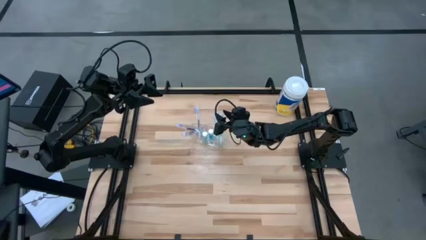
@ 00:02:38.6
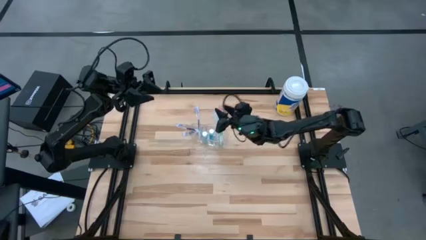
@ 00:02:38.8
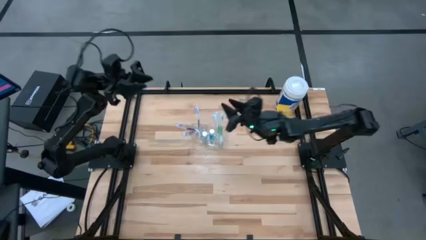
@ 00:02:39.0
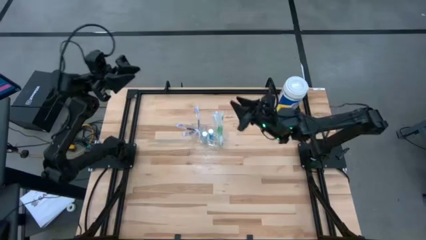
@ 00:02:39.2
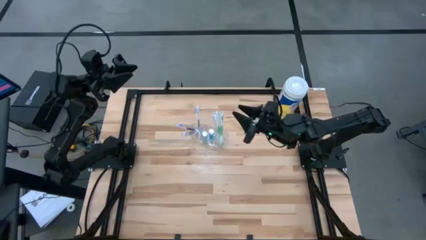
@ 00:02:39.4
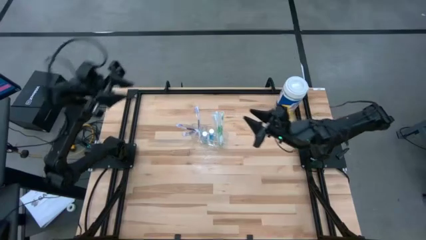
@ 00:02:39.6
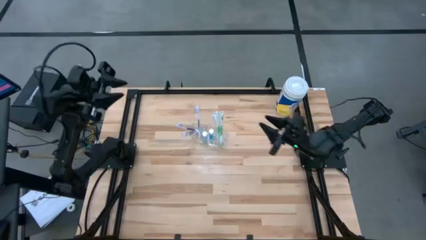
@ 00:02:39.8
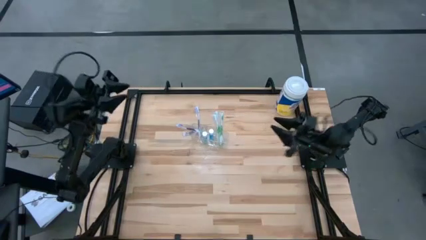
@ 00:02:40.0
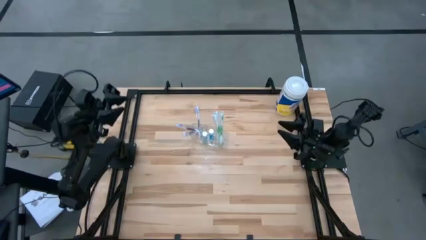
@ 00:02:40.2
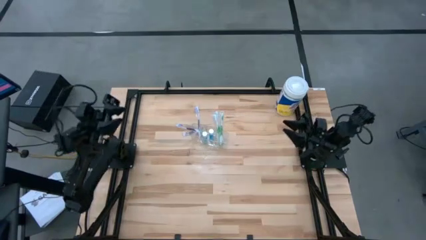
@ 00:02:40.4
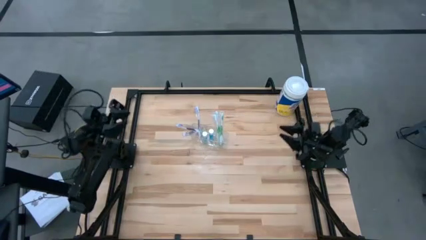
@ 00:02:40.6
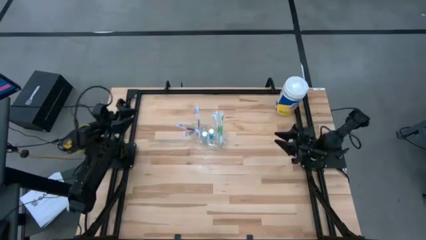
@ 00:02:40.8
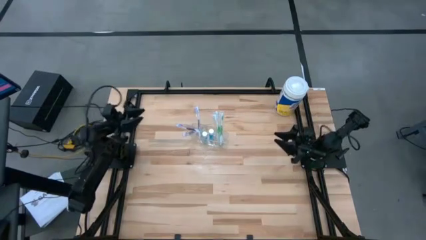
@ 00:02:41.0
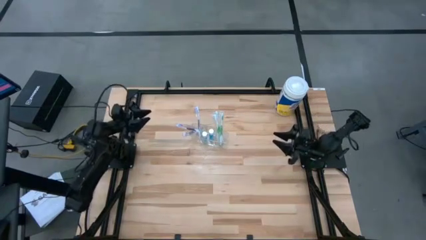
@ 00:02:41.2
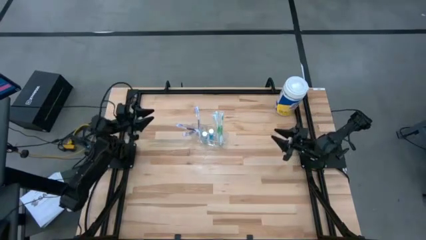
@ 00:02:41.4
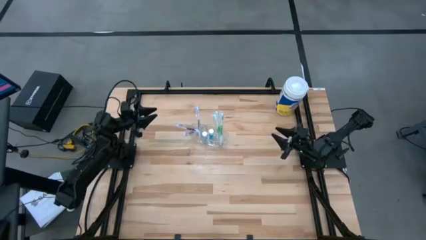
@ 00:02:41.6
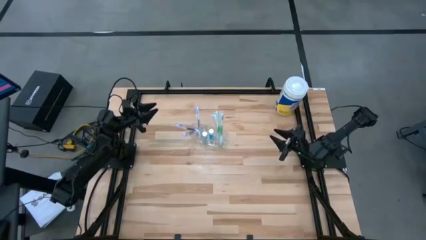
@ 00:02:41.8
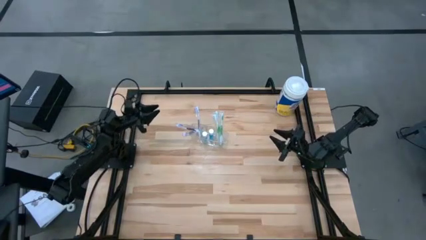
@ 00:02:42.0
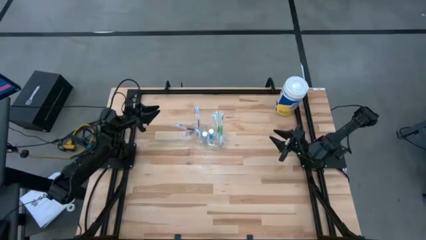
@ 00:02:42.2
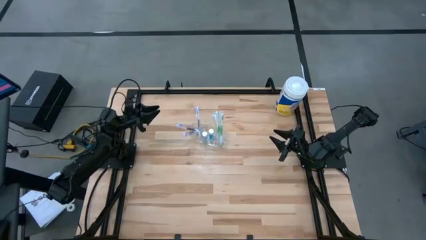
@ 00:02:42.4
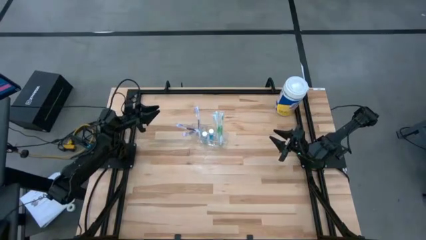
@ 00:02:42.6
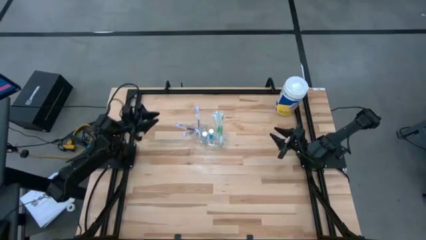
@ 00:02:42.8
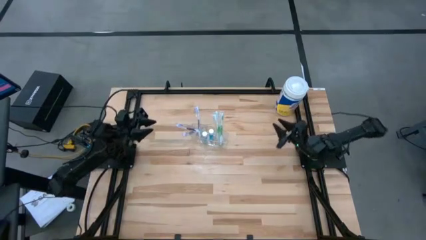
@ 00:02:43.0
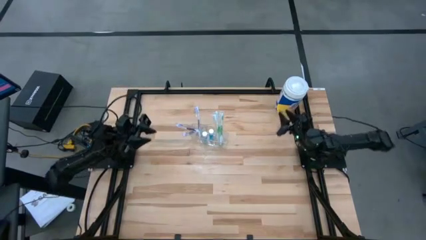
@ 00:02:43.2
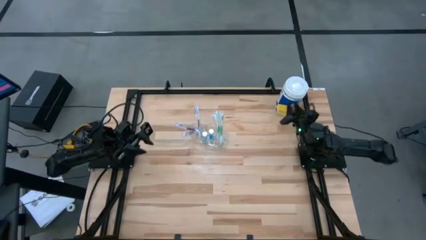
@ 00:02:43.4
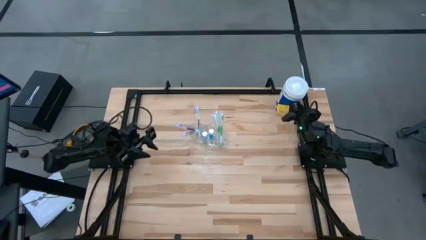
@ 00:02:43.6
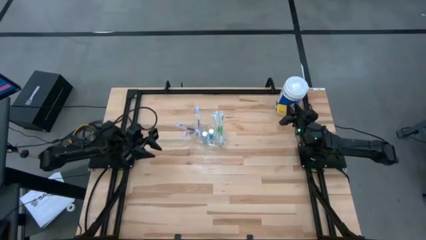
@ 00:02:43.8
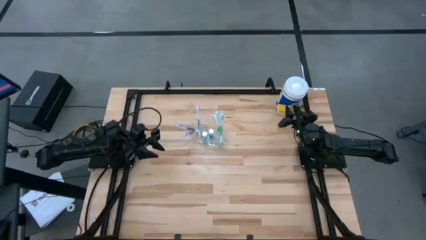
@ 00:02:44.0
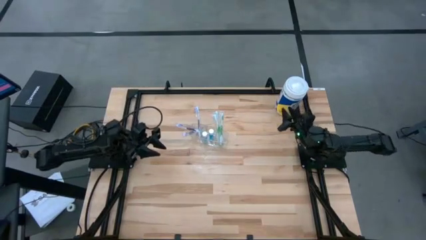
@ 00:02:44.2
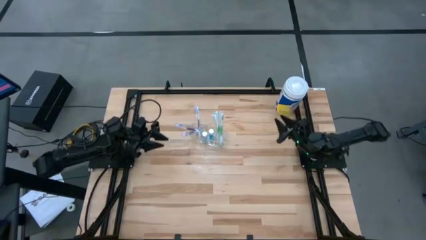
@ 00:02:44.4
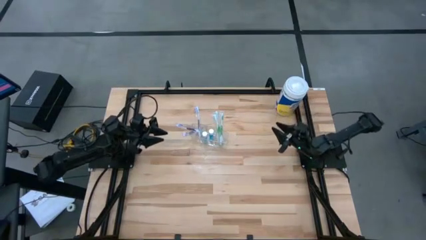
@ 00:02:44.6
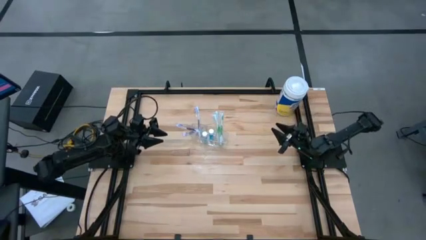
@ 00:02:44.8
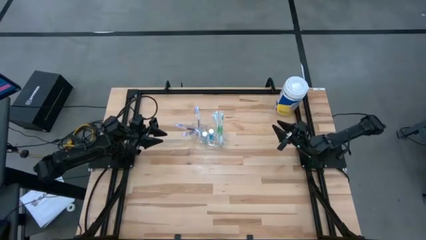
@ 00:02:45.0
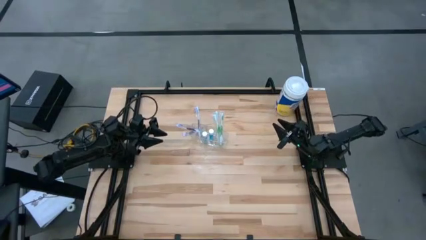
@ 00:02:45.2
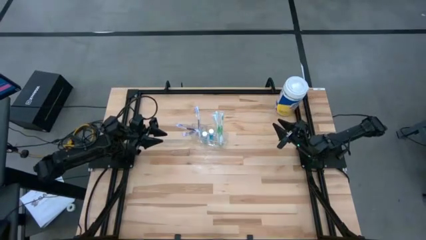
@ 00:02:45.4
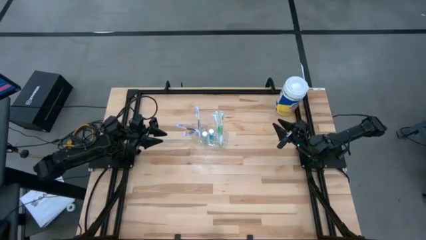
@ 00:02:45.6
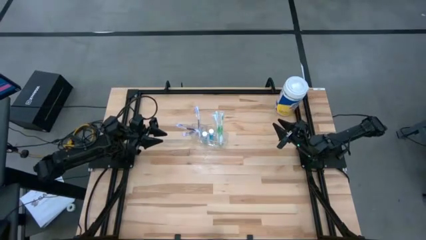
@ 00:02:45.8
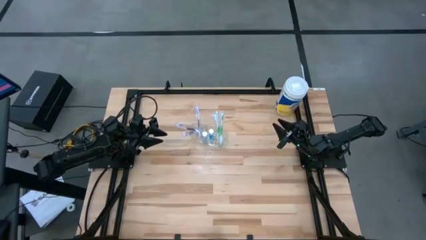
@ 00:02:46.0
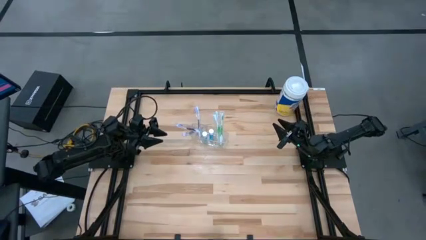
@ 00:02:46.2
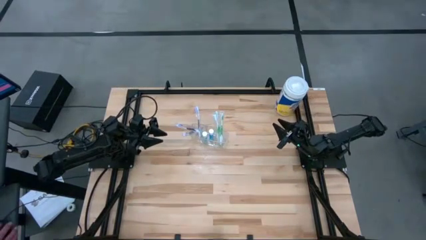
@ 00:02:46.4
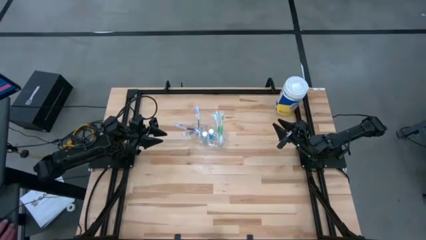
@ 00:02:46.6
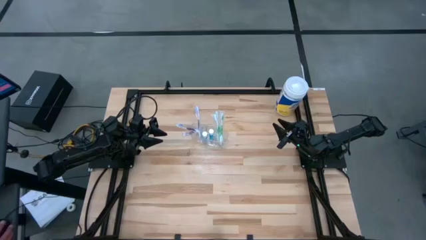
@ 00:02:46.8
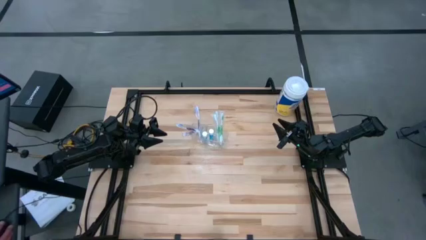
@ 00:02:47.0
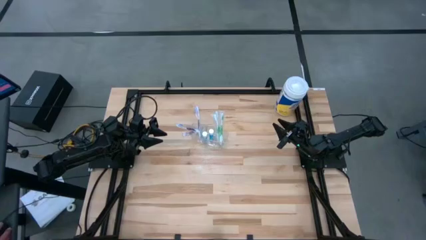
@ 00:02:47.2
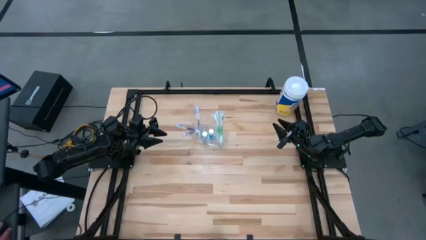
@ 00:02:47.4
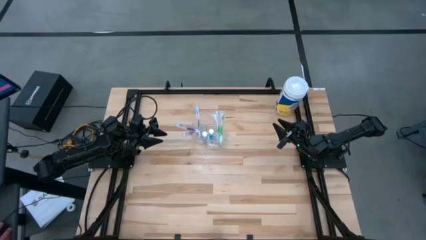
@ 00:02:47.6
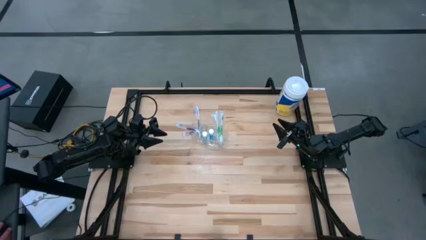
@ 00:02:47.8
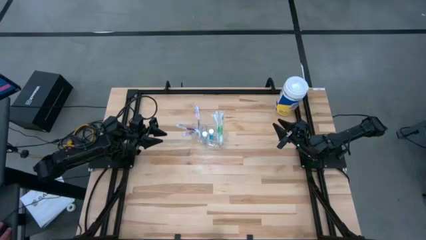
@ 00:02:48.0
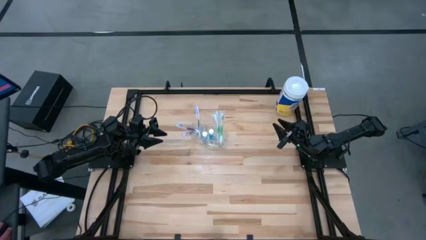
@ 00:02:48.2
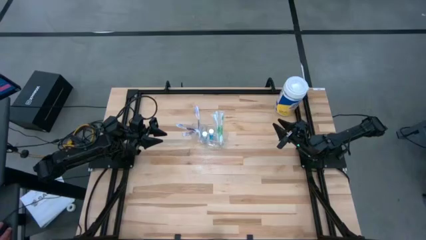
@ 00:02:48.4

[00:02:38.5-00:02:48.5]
Task: Pick & Place toothbrushing station
Return to Home Position

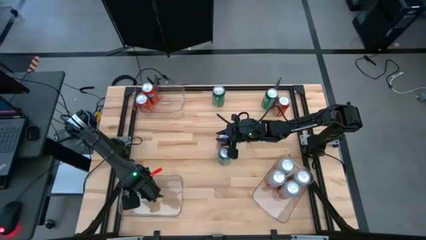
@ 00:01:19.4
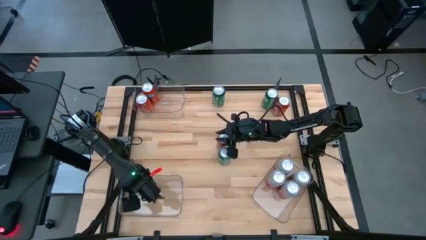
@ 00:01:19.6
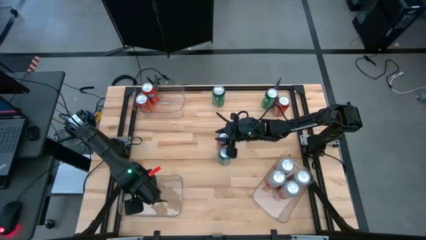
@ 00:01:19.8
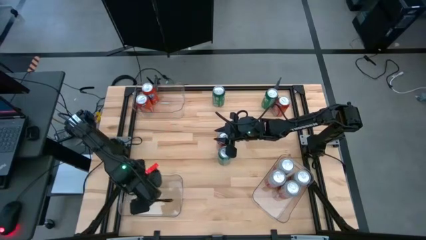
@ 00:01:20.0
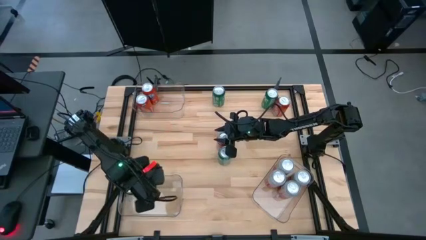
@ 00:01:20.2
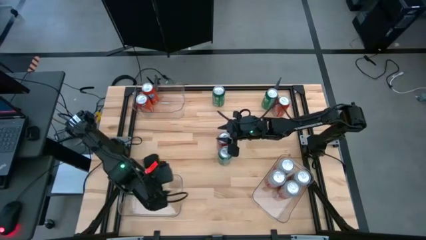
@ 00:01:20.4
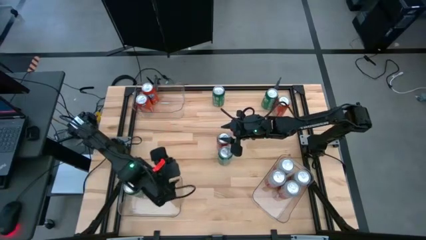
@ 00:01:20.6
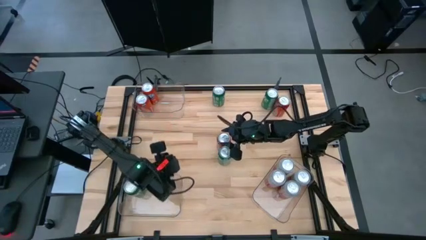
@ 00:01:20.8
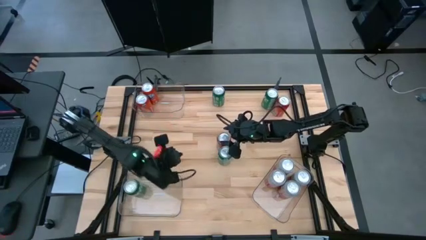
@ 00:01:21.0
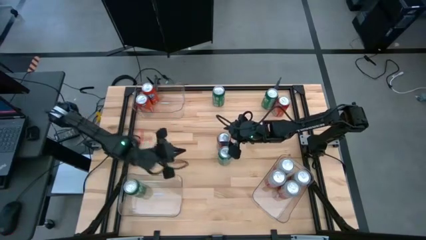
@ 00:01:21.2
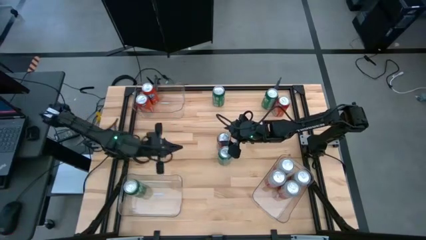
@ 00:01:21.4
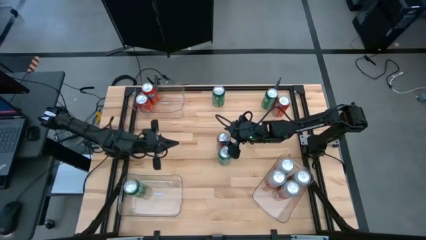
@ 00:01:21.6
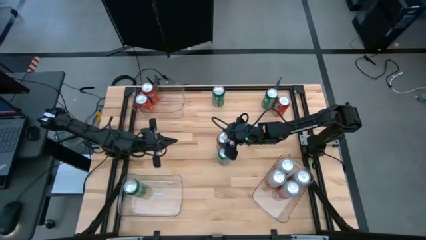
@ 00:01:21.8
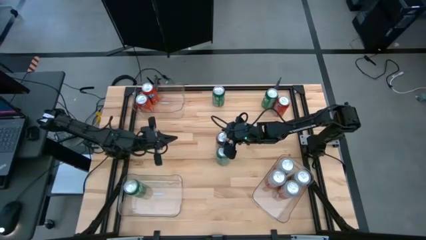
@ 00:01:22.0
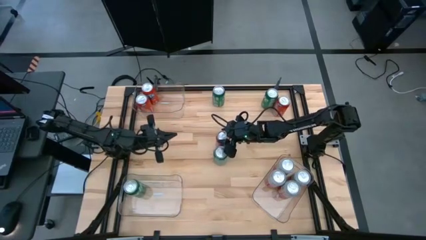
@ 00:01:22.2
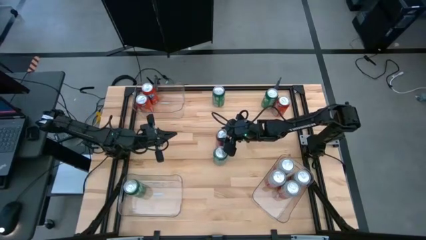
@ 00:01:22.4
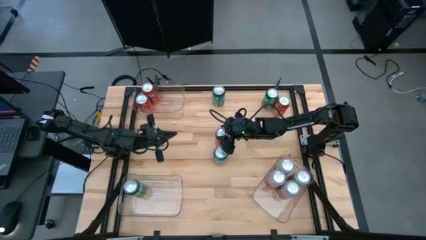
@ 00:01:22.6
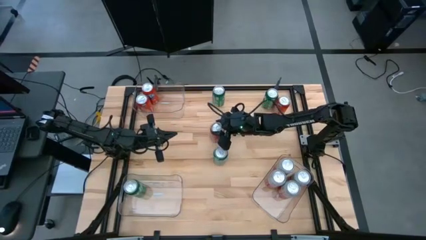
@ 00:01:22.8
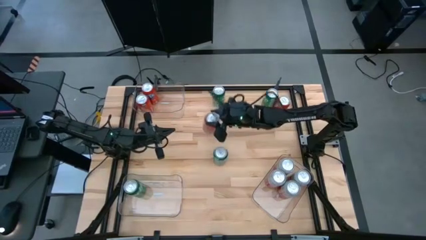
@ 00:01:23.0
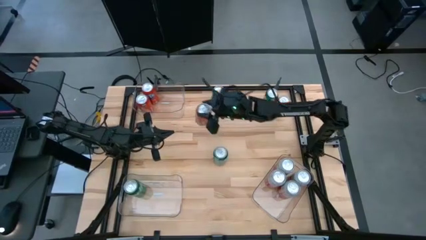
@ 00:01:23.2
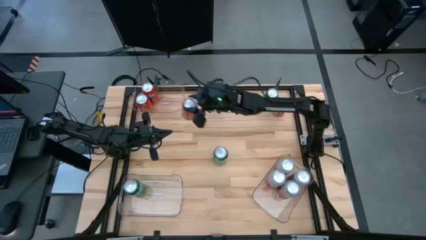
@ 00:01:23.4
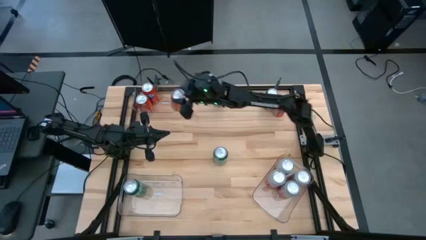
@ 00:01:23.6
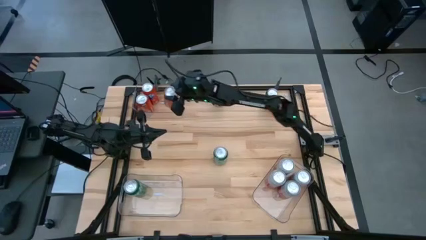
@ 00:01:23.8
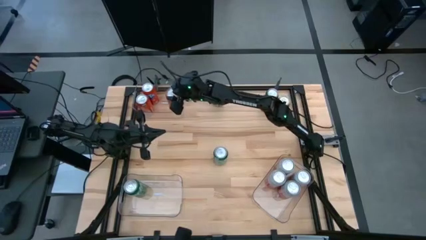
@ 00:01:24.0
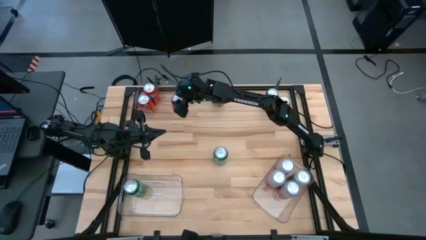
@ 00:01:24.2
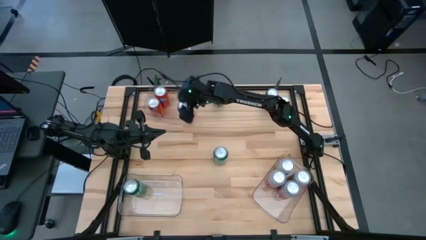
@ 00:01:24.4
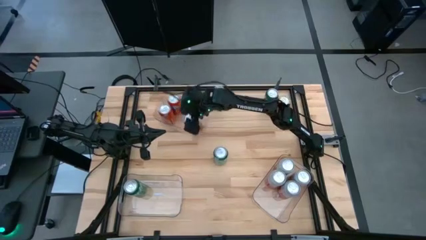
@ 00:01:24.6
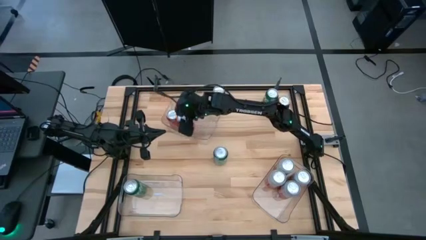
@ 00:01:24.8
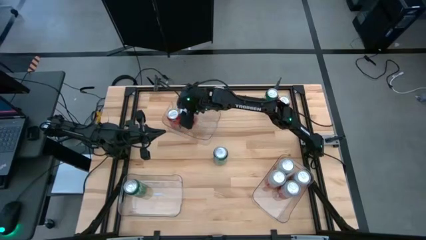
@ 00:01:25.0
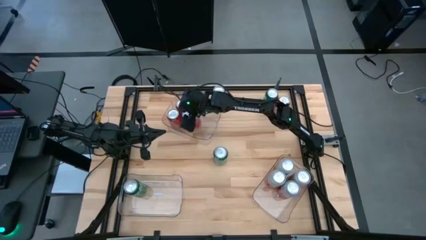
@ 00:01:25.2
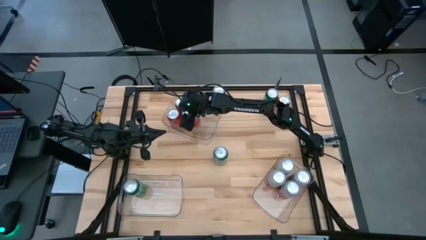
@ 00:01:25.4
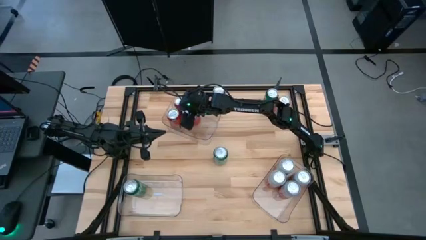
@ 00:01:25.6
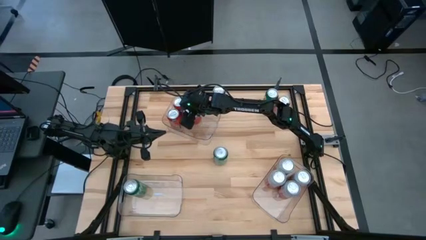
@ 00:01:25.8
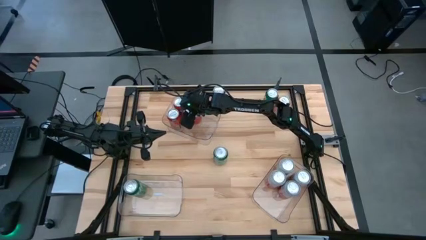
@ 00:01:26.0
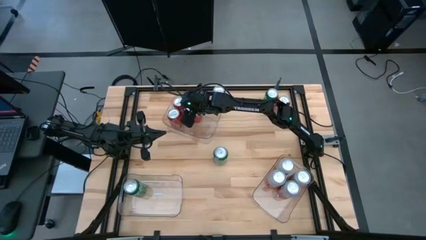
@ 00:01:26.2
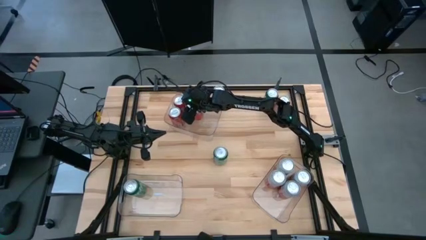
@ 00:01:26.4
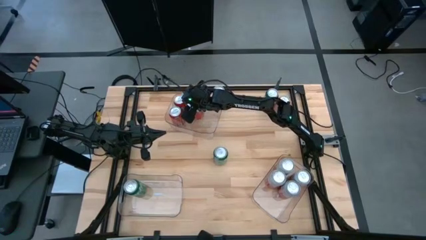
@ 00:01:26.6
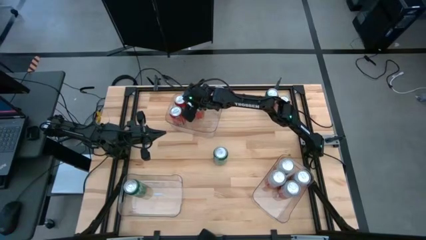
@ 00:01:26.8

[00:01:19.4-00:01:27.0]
Task: Sort soda cans
Put the orange soda can into the top left transparent bin
